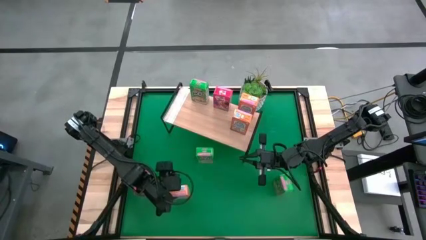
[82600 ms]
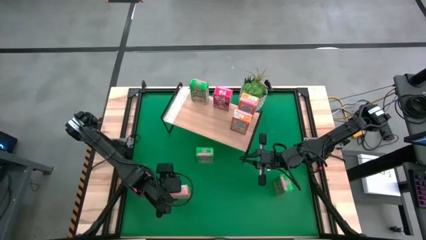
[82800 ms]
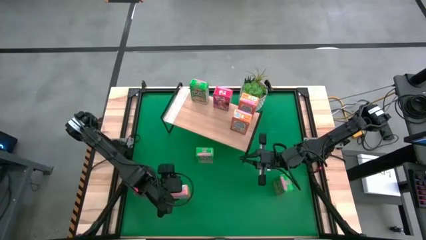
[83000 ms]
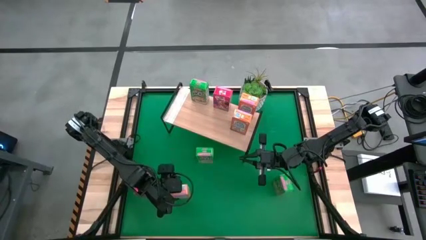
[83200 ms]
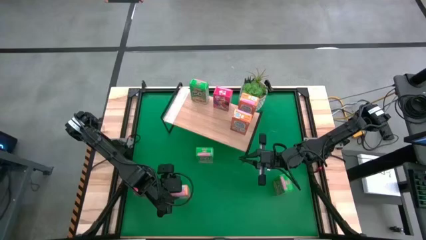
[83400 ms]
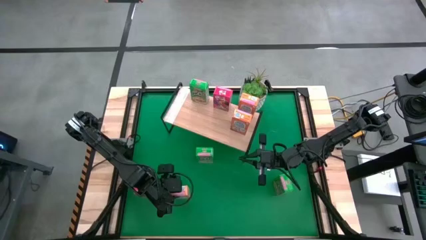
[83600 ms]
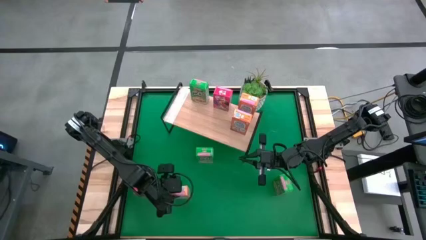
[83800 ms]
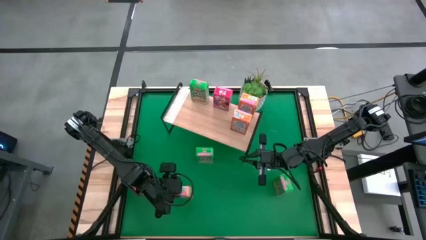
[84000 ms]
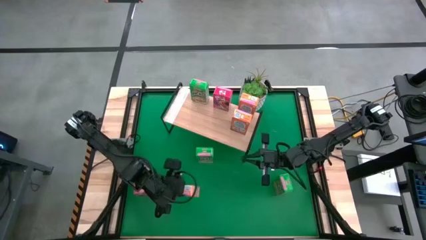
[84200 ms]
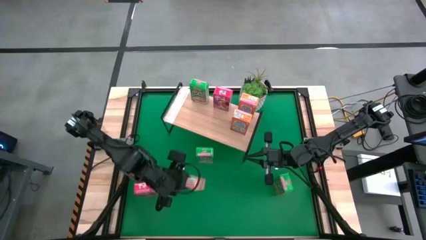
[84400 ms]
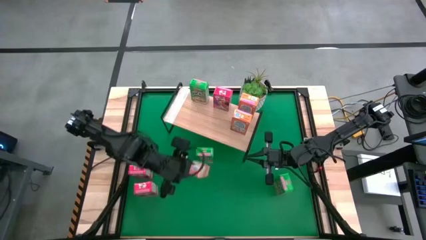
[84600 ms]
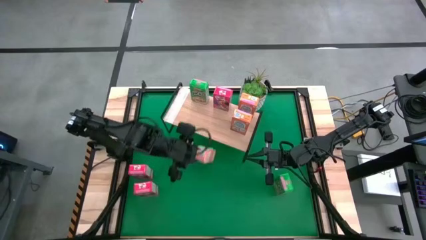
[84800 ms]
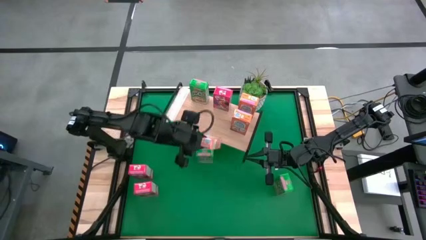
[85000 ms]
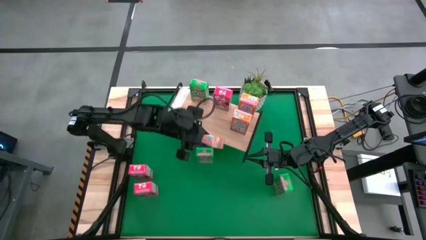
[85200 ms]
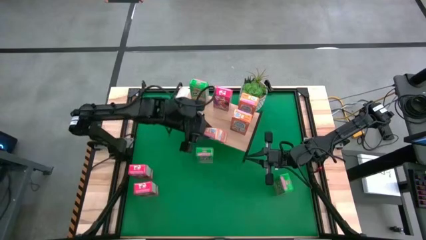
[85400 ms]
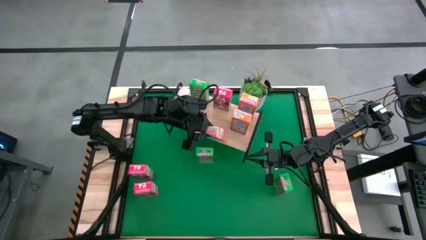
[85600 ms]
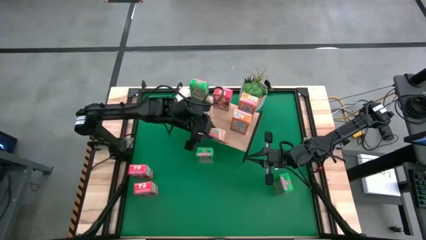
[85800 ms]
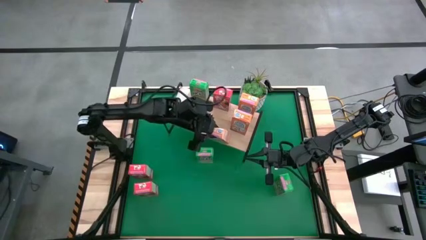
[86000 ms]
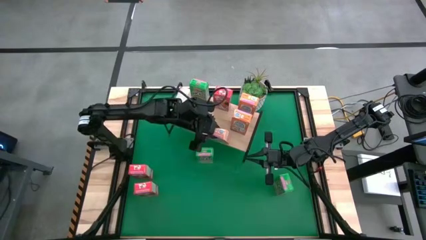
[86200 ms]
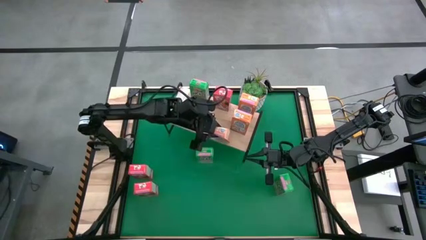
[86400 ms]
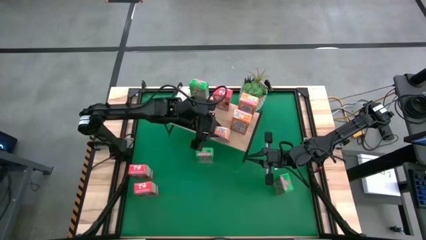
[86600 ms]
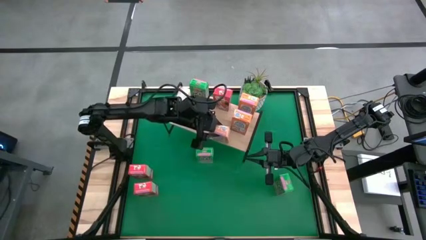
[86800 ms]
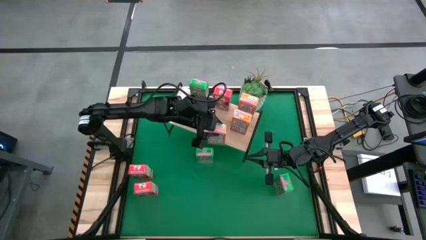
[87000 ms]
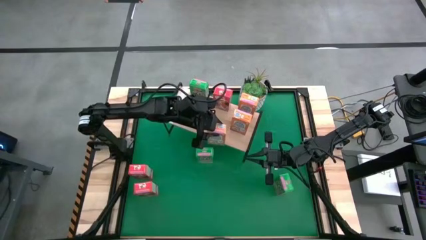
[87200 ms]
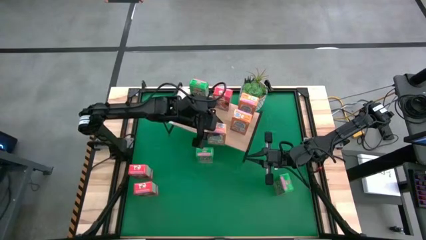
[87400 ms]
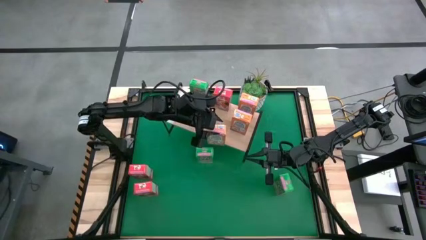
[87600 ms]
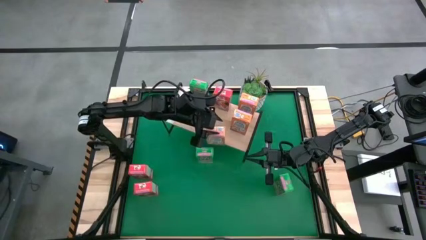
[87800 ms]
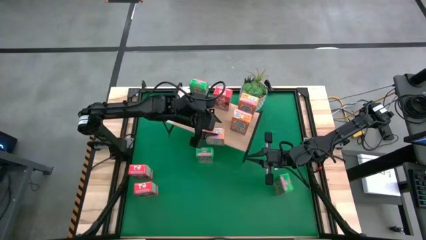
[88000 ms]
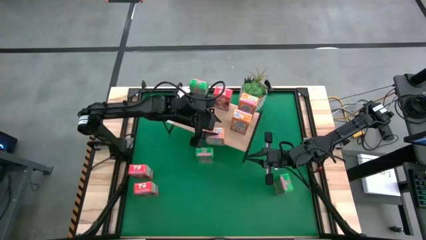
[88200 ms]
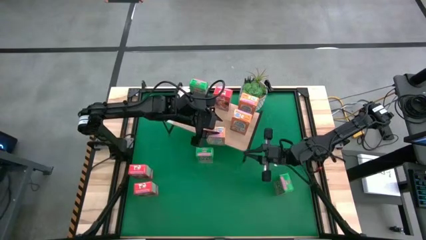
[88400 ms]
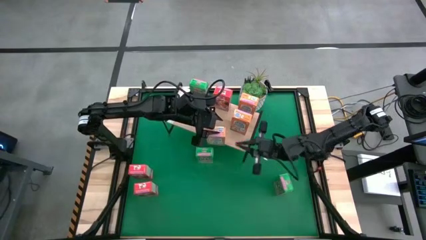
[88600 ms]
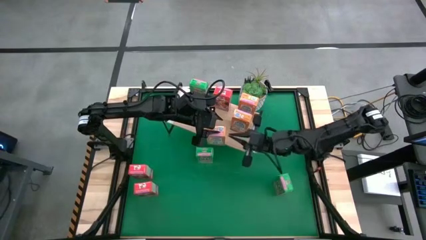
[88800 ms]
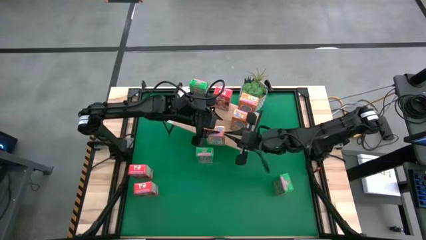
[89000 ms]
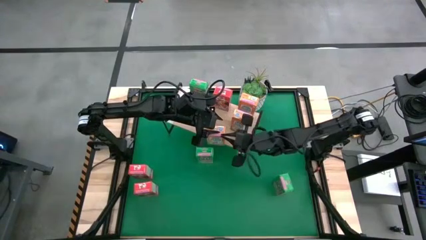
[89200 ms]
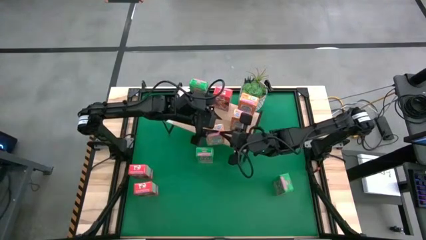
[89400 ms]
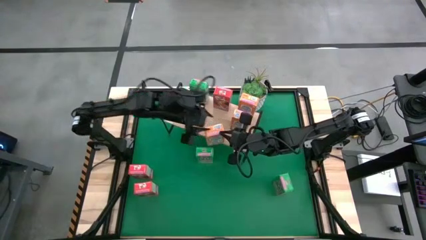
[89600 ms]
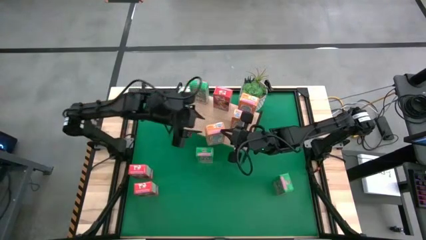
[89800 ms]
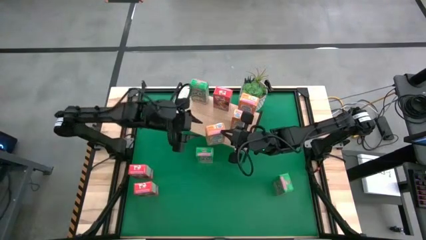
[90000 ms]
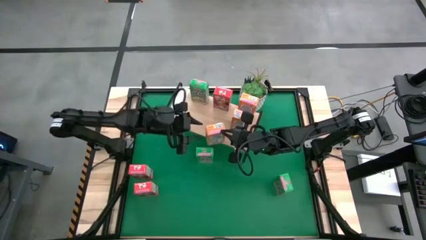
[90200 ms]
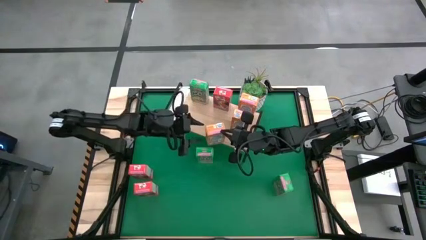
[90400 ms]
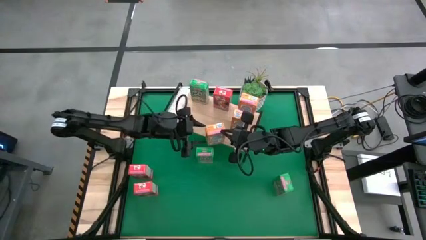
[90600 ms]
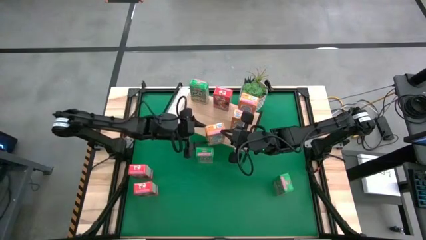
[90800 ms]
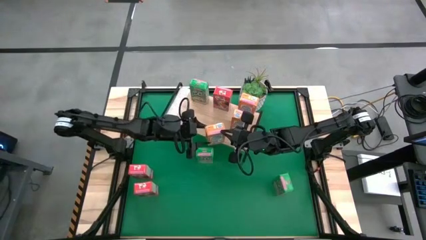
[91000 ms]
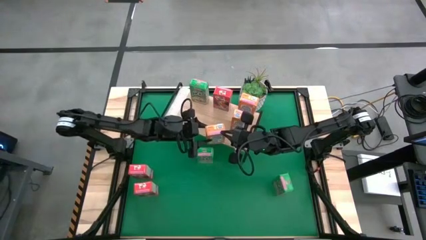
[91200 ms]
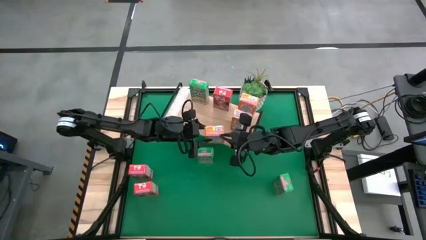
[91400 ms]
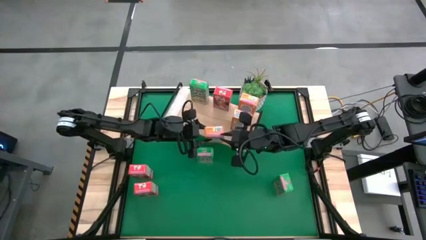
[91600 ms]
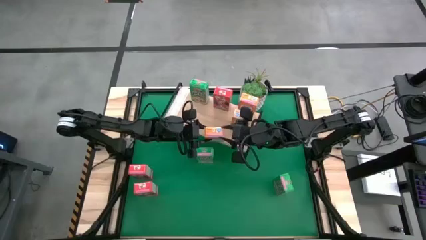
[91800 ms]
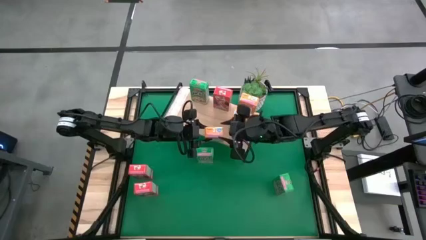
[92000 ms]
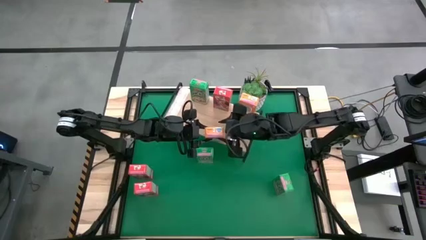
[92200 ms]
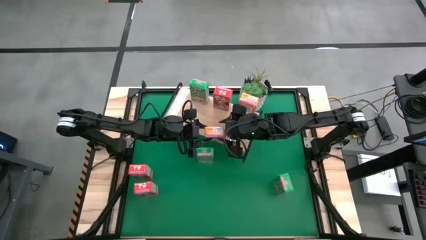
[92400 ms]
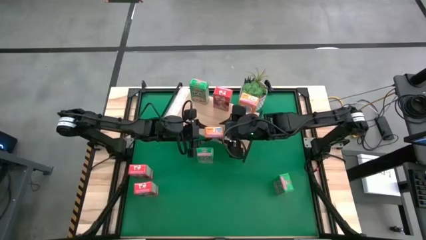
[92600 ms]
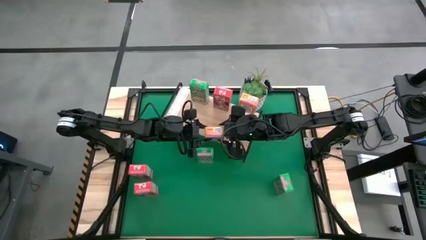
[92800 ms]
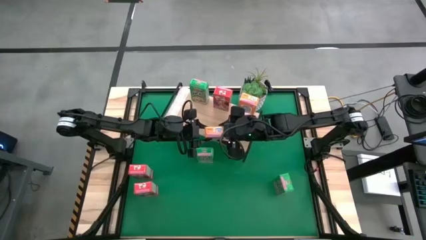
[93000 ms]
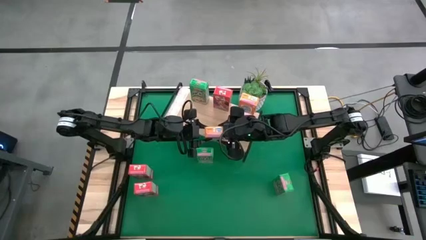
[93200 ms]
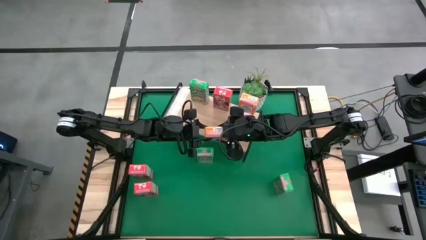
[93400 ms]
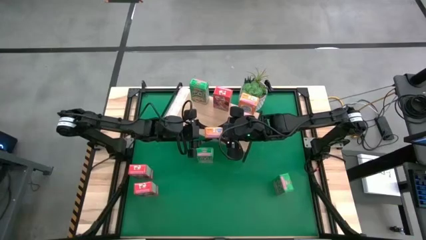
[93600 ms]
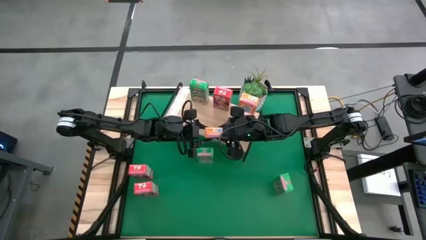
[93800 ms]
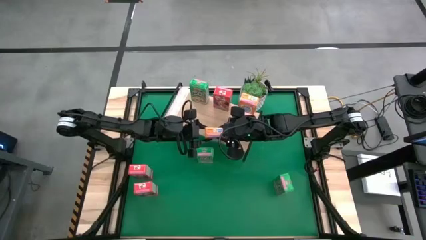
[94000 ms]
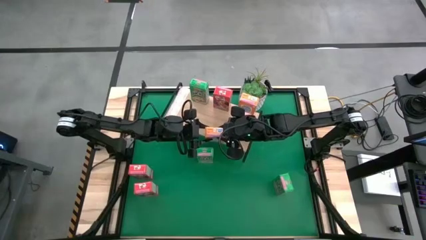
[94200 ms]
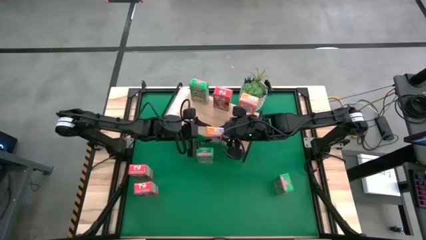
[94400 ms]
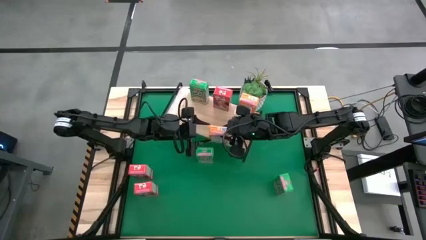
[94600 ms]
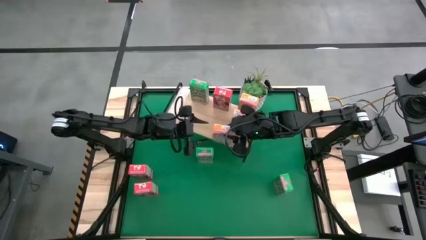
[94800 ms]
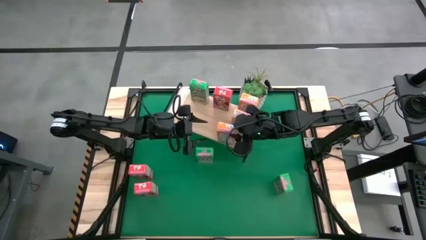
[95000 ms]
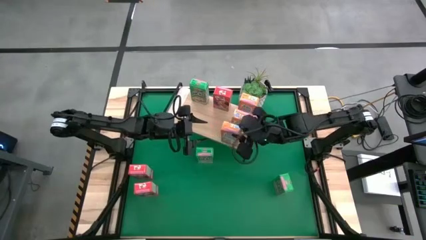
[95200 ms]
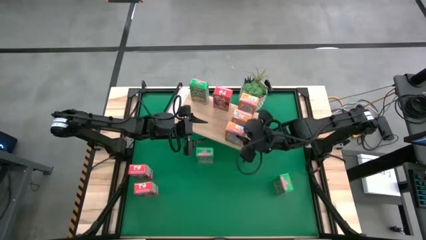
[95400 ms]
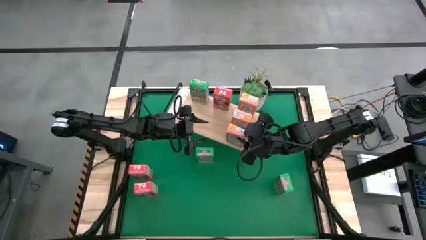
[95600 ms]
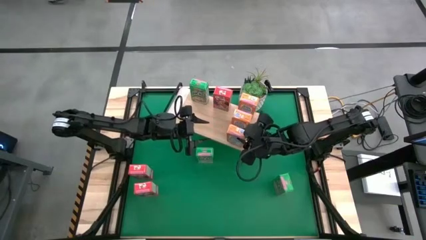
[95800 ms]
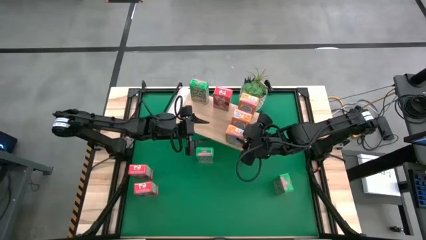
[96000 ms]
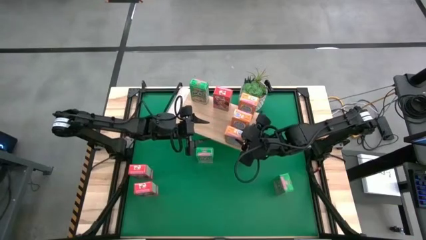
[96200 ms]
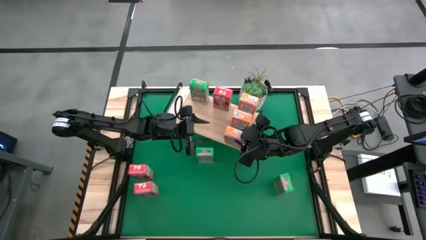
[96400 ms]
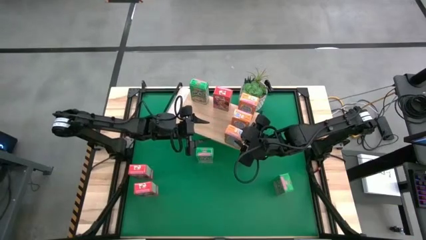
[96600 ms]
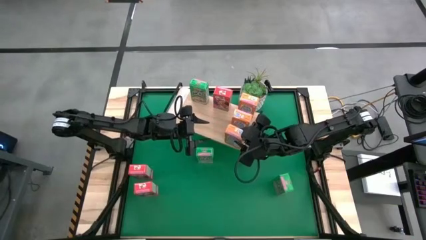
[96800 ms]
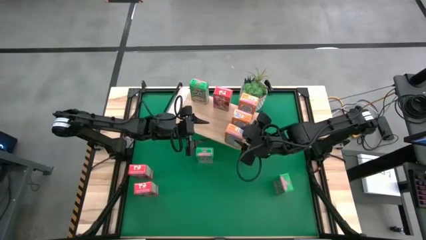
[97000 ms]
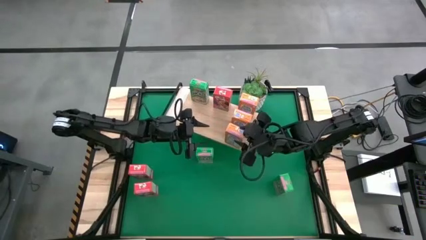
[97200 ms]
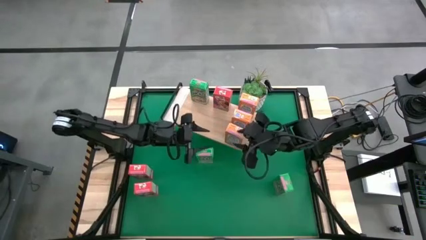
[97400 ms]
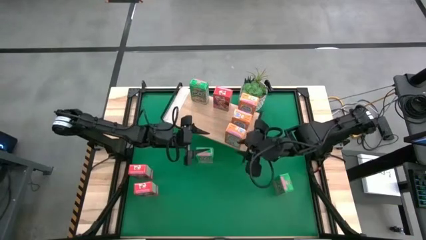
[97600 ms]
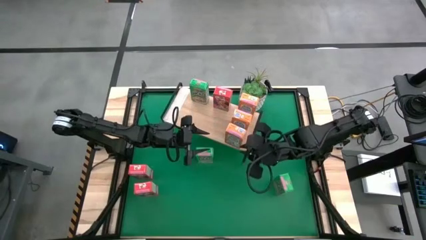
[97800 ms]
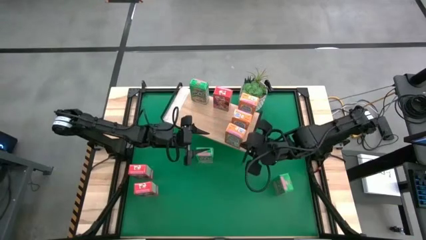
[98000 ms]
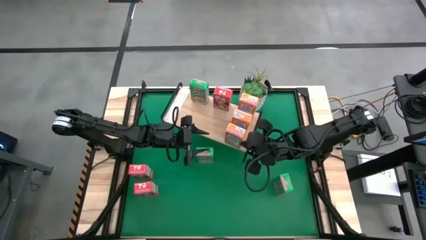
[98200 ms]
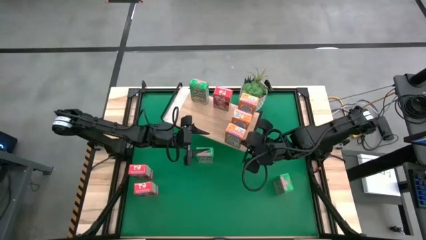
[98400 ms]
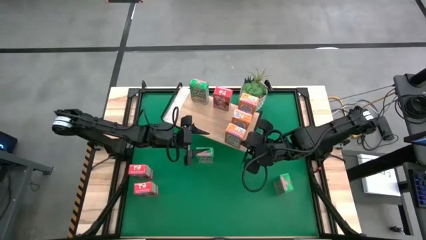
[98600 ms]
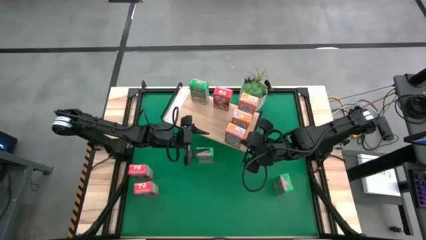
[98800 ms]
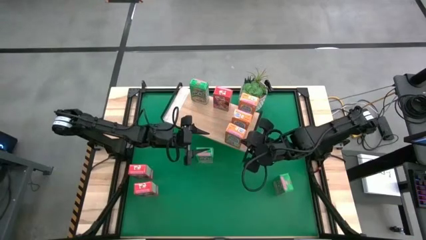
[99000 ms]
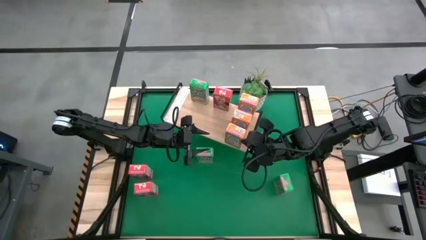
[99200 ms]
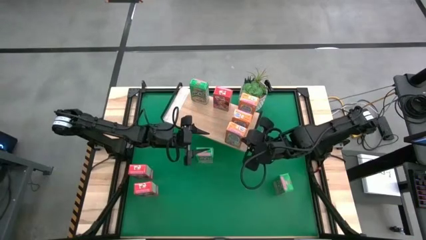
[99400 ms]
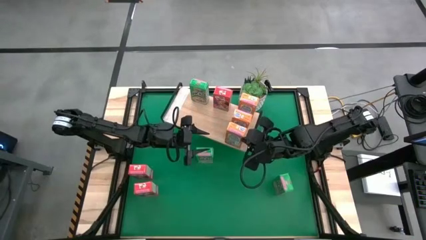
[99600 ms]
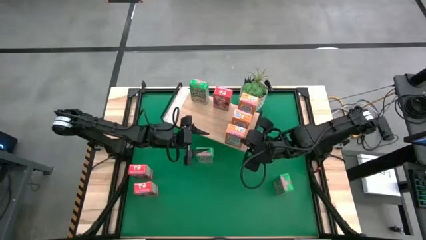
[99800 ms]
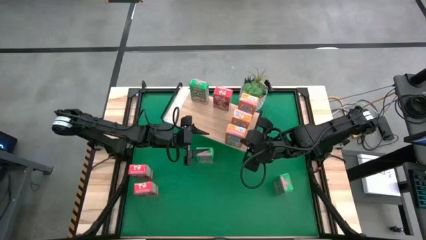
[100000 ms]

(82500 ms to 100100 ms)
Task: Stack cereal on shelf
Put the orange cereal box aligned with the other orange cereal boxes on the shelf
